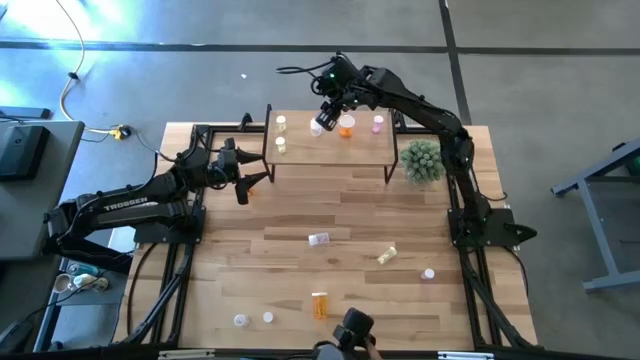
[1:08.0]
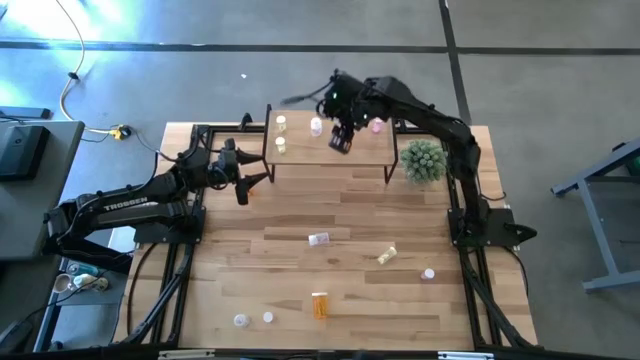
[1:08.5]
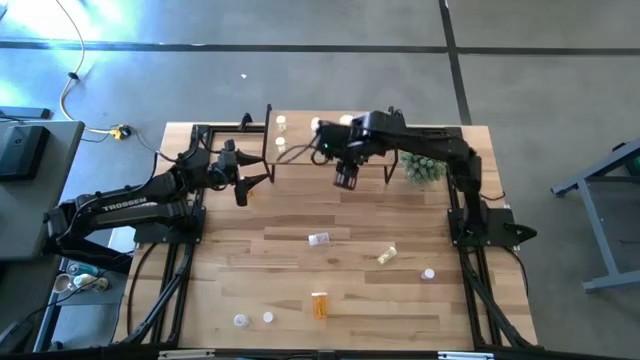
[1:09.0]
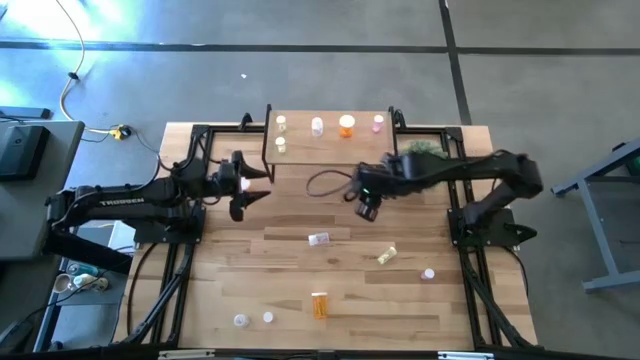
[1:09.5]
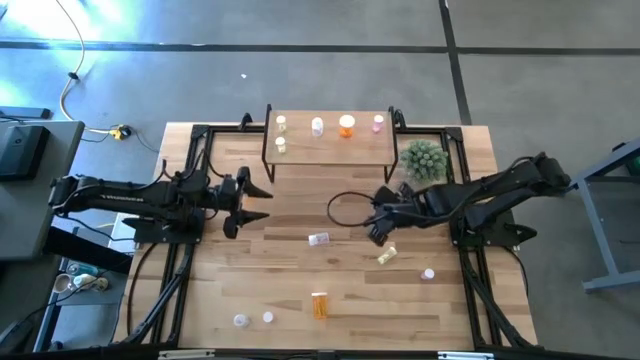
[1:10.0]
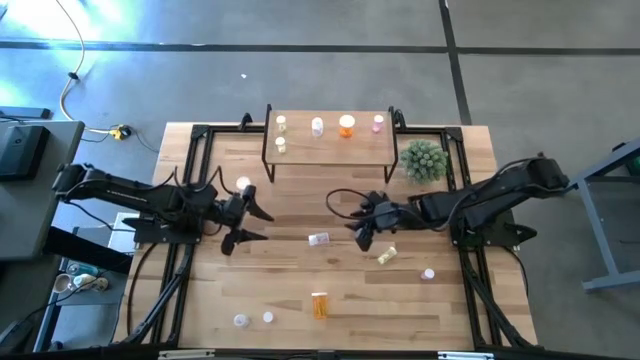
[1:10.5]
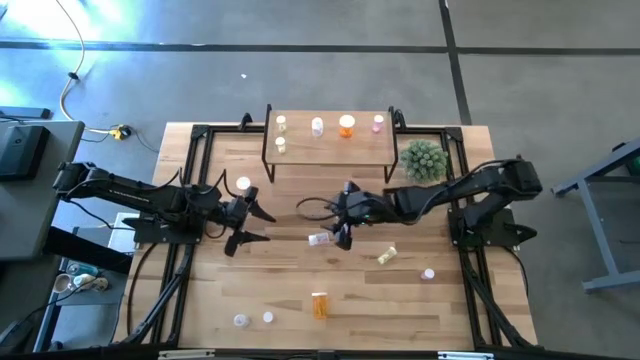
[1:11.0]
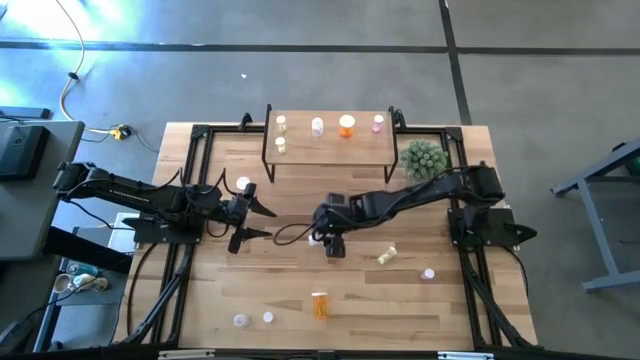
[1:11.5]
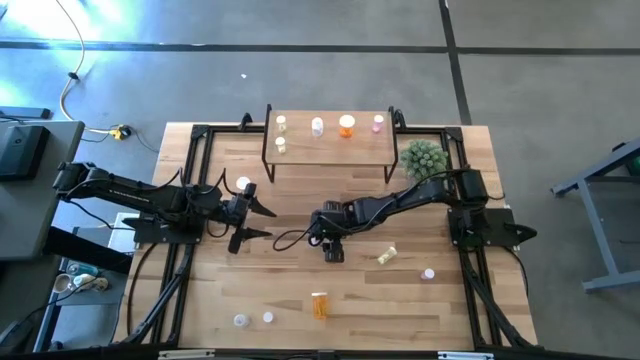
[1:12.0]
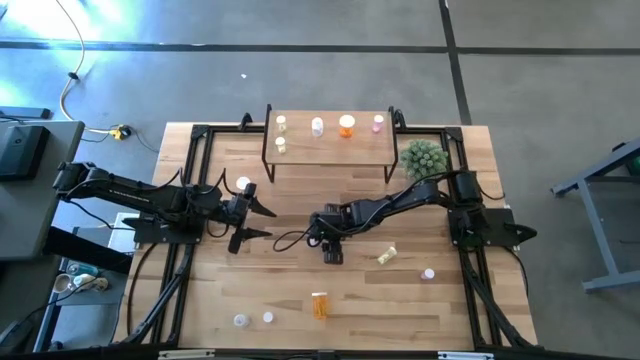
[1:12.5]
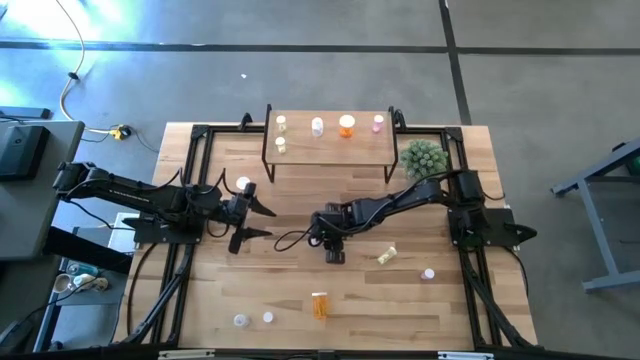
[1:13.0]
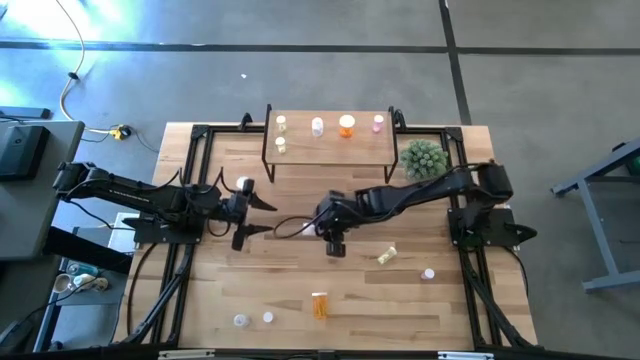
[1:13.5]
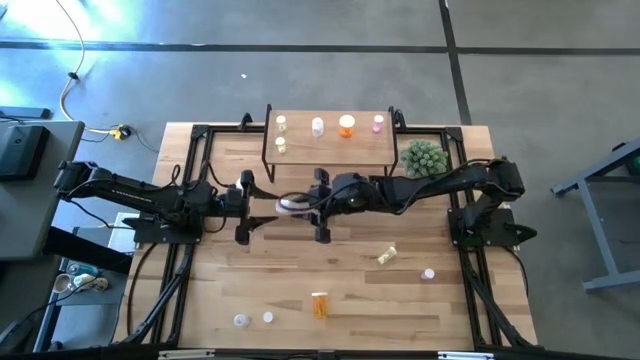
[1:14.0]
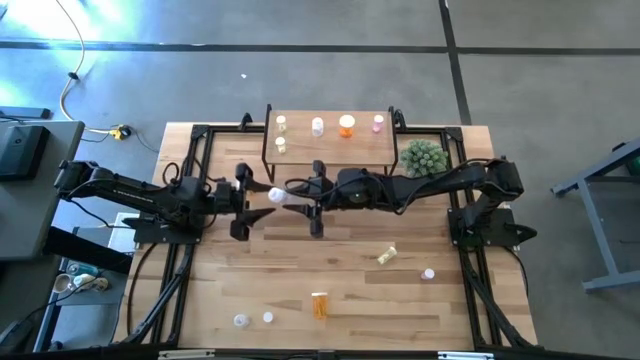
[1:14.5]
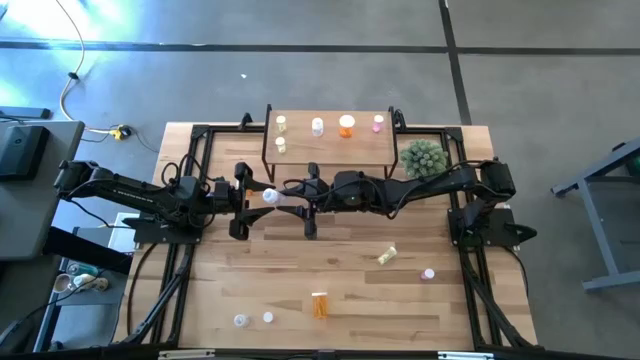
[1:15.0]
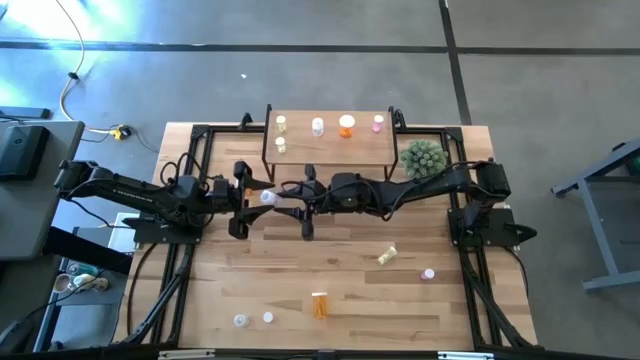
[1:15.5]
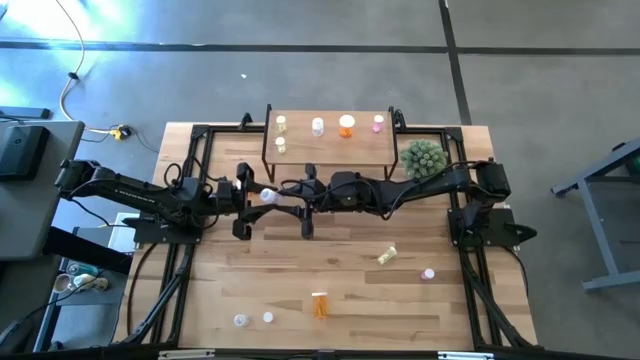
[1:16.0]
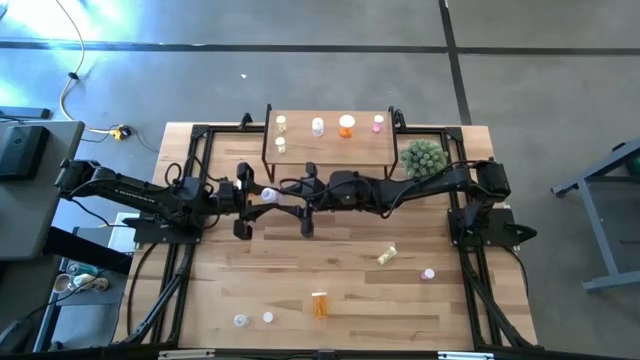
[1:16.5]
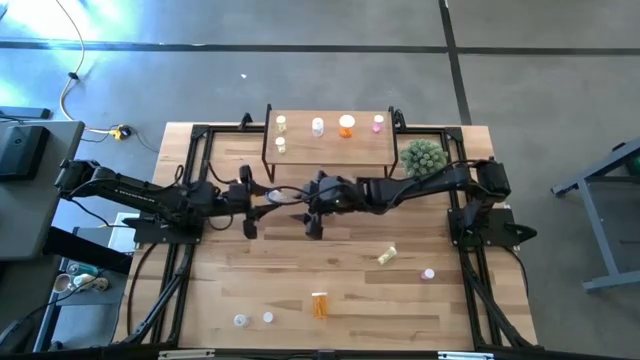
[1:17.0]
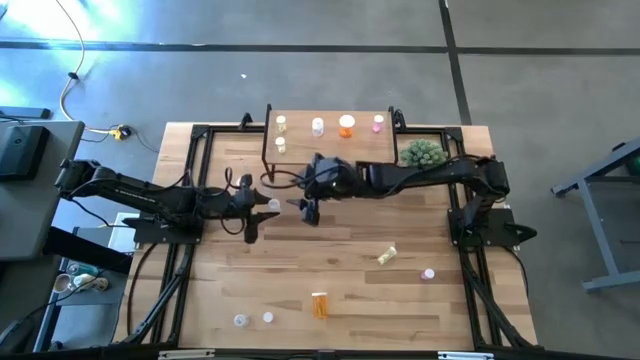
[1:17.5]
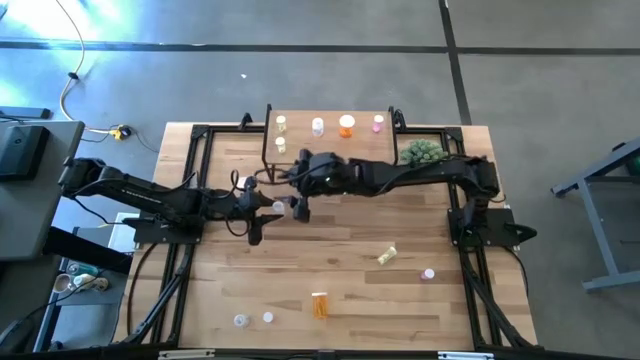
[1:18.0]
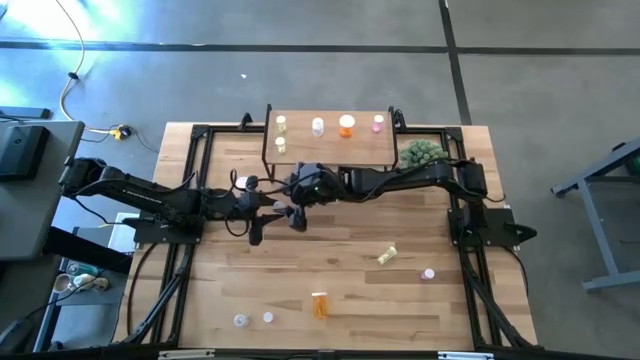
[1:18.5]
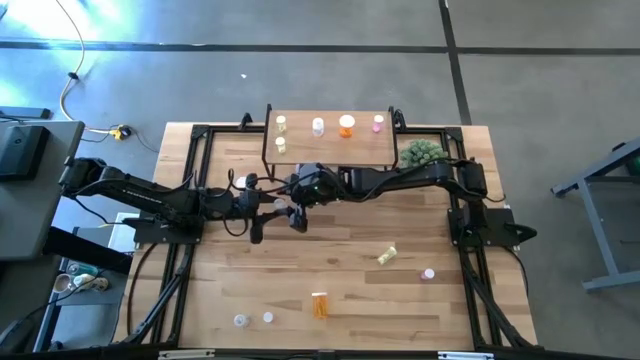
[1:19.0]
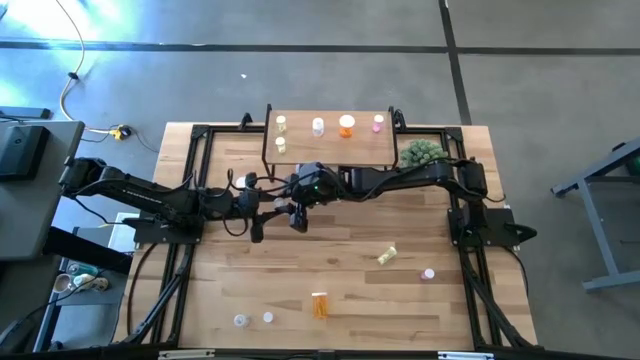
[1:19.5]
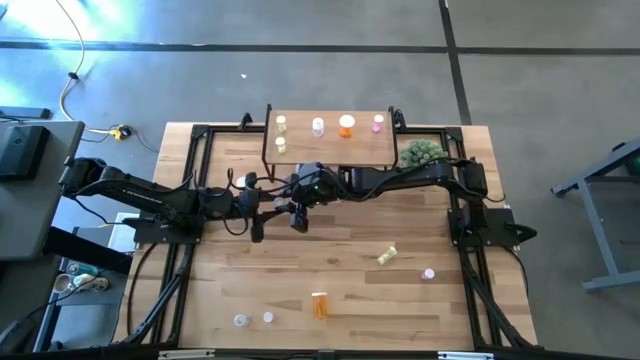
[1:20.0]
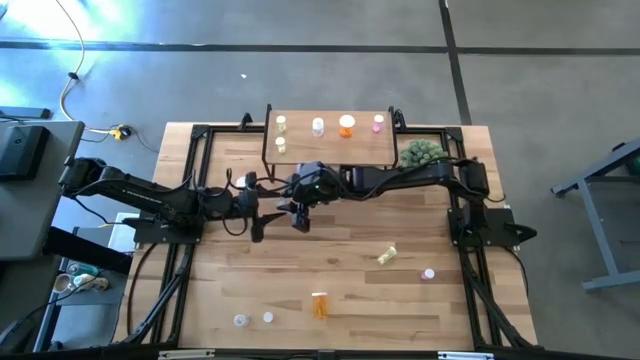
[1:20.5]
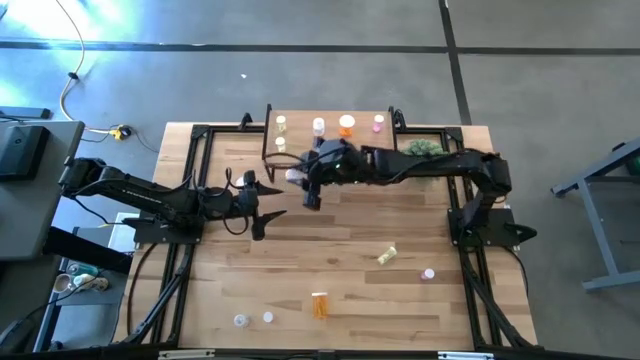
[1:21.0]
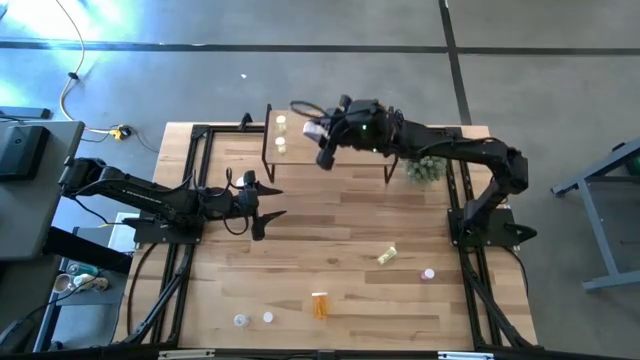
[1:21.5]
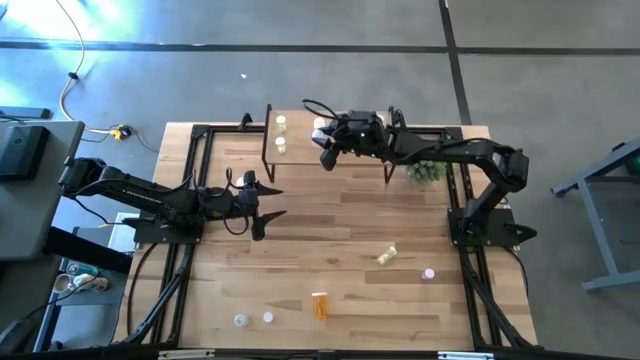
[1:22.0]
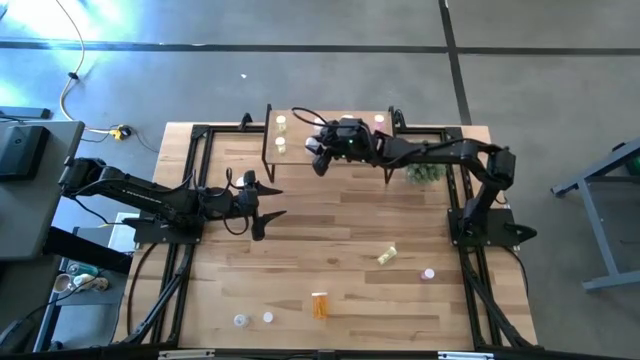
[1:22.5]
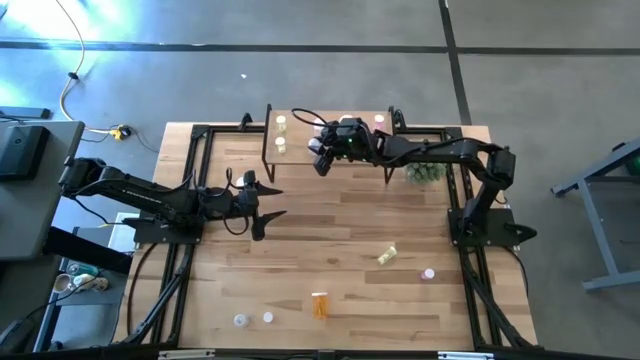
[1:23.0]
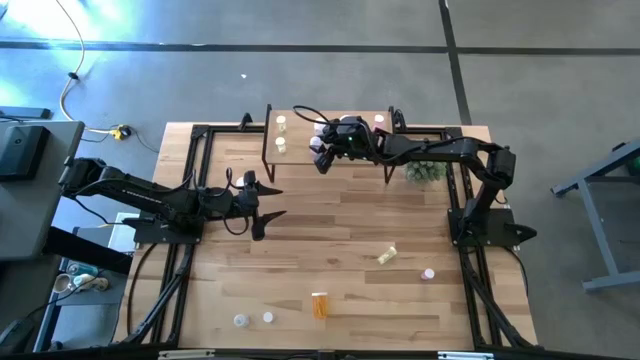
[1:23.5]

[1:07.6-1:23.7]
Task: Pick and place medicine bottles onto shelf by color
Put the top transparent pill bottle aligned with the other transparent pill bottle on the shelf

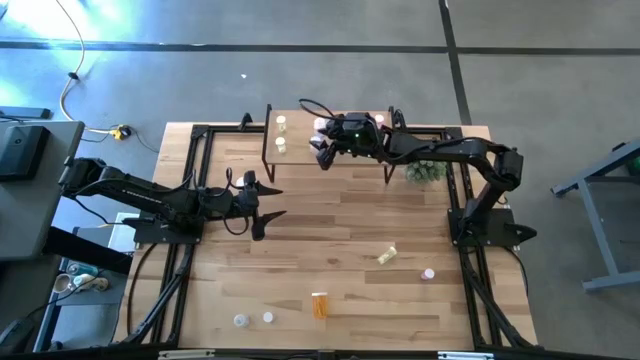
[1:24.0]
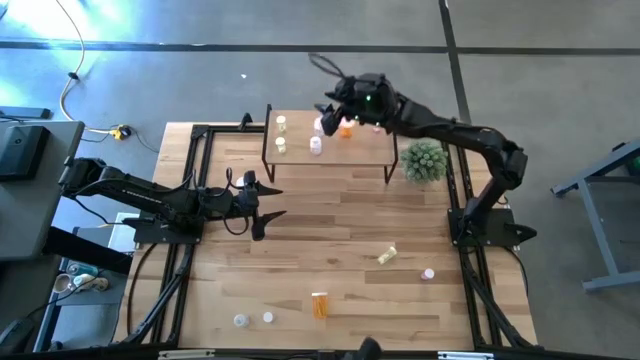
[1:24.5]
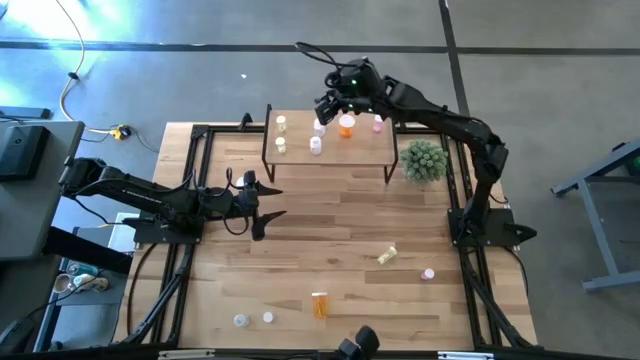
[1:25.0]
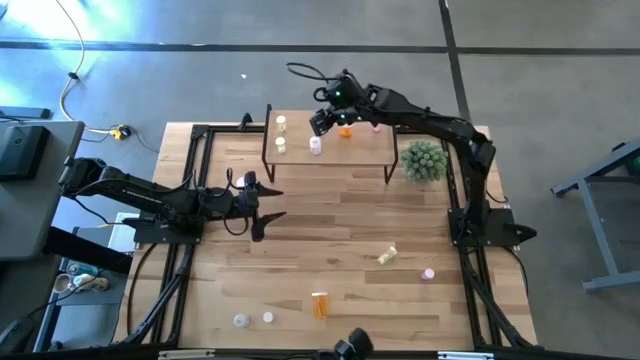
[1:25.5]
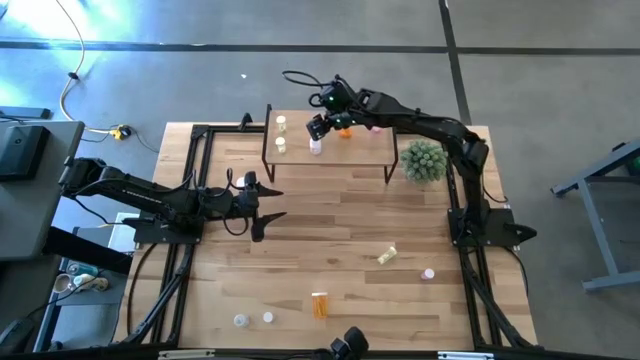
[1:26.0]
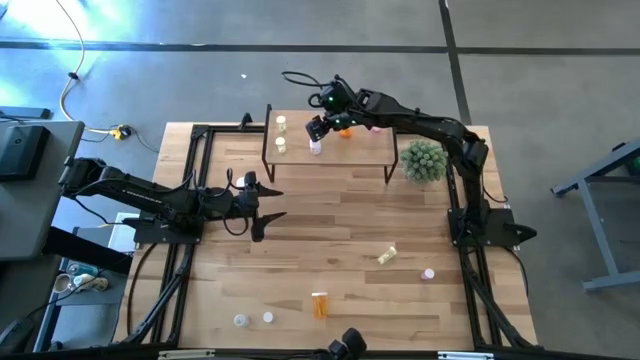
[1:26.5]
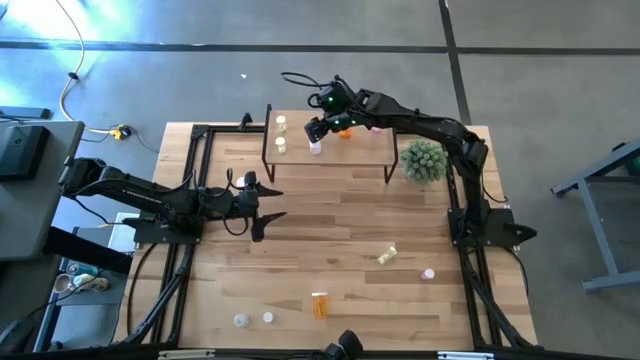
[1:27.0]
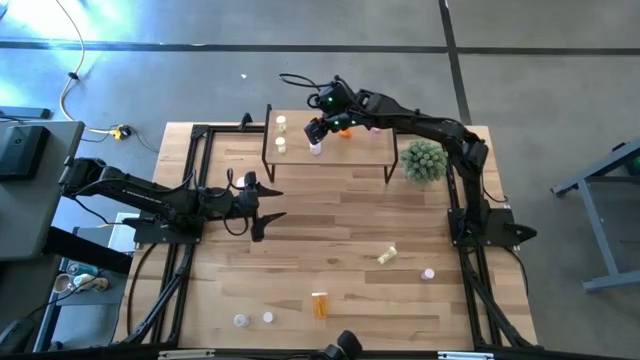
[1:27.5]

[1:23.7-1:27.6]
Adjust the top transparent bottle on the shelf

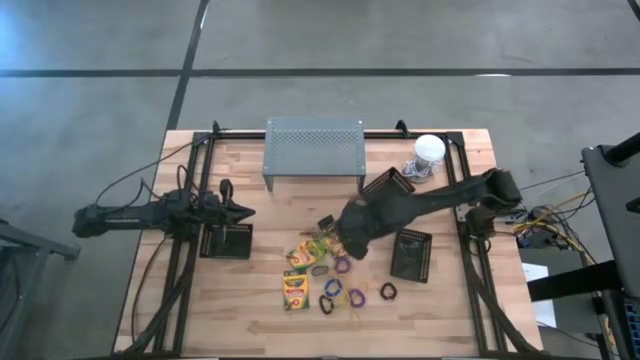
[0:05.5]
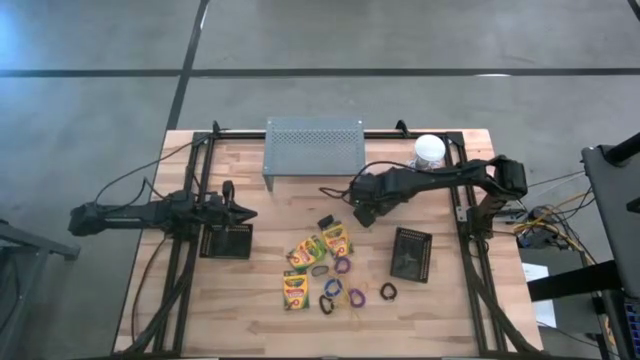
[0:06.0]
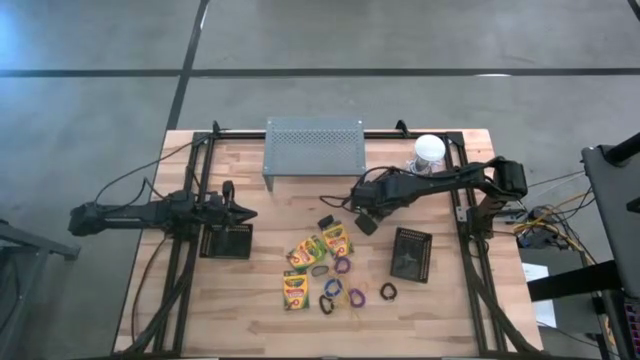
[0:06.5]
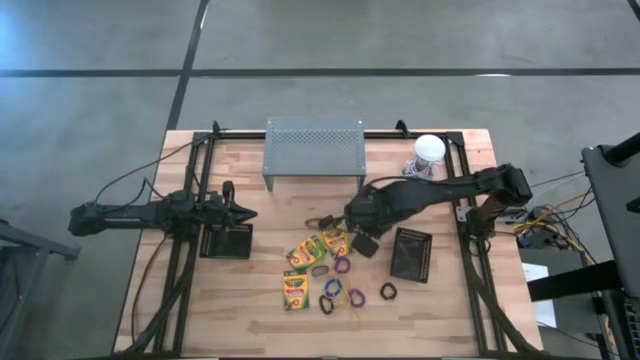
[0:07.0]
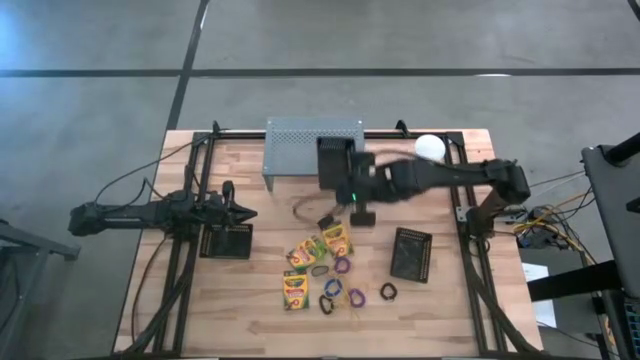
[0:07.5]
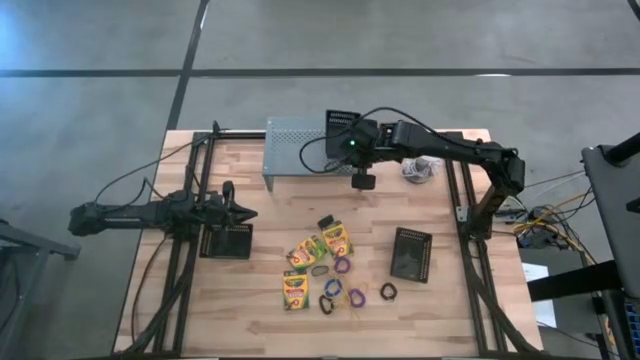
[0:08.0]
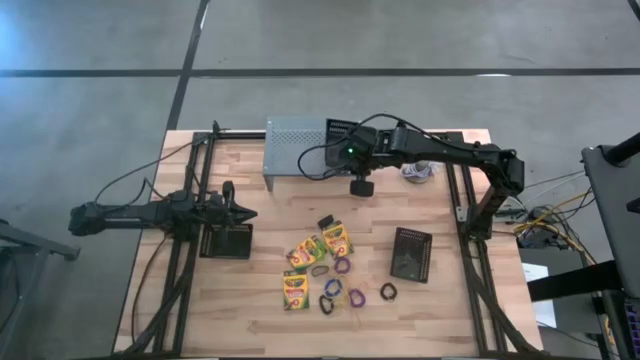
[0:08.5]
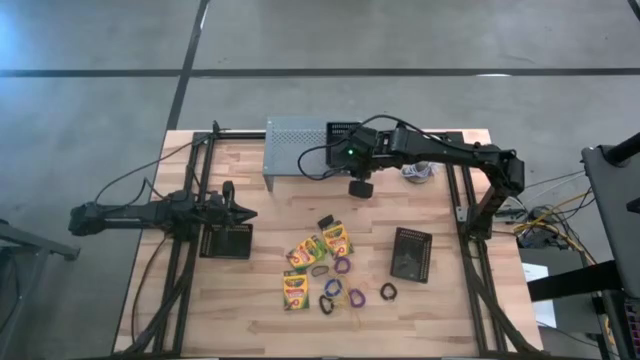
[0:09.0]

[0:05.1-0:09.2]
Task: Pick & Place Office Desk Supplies
Put the top black bin on the shelf
